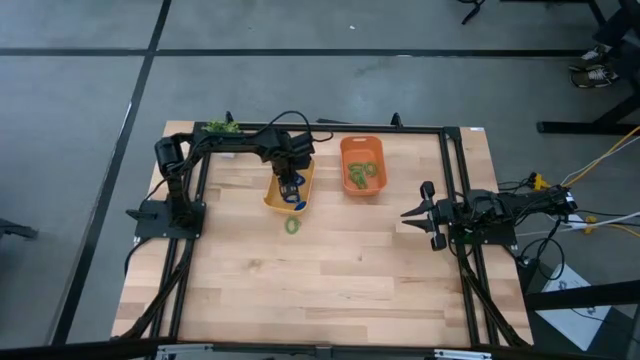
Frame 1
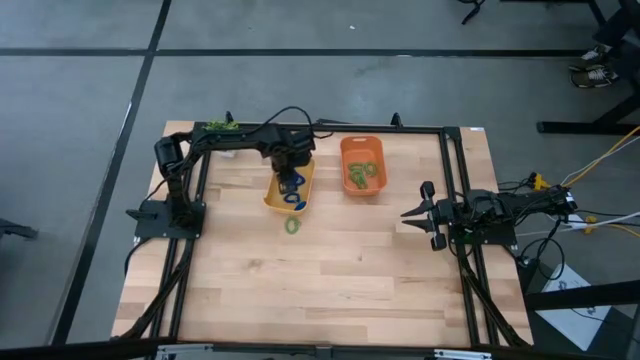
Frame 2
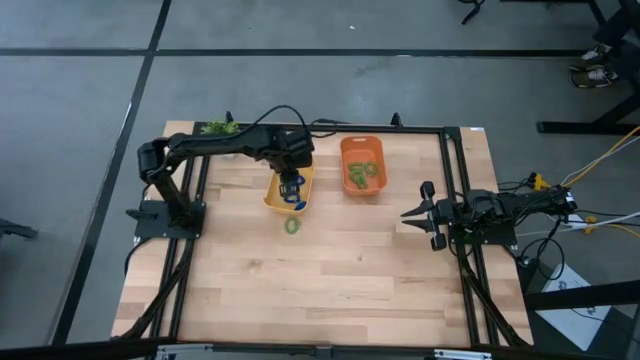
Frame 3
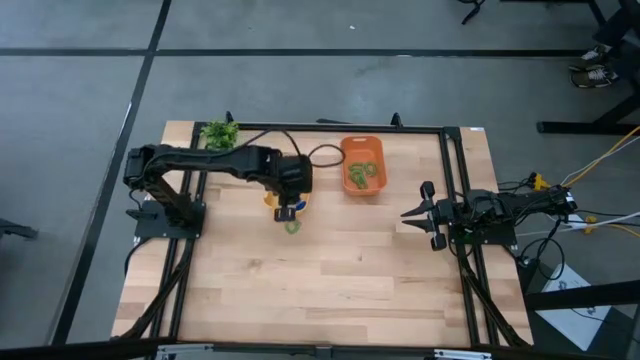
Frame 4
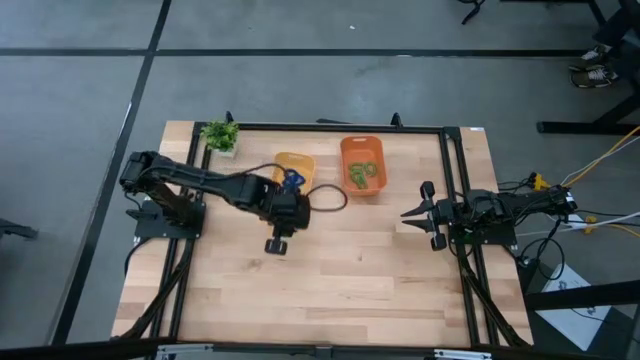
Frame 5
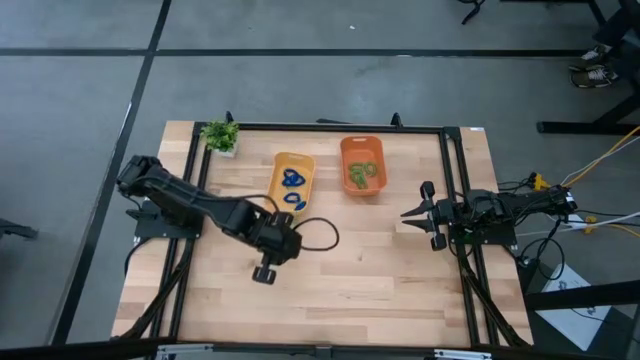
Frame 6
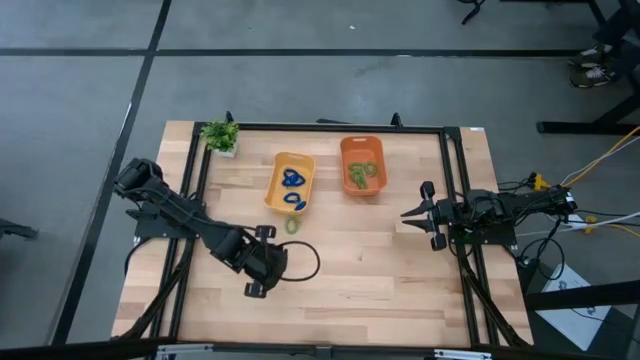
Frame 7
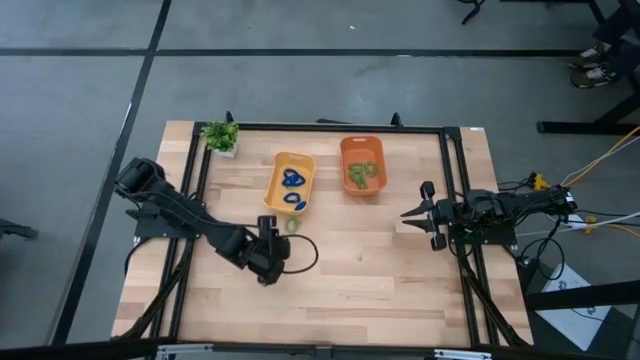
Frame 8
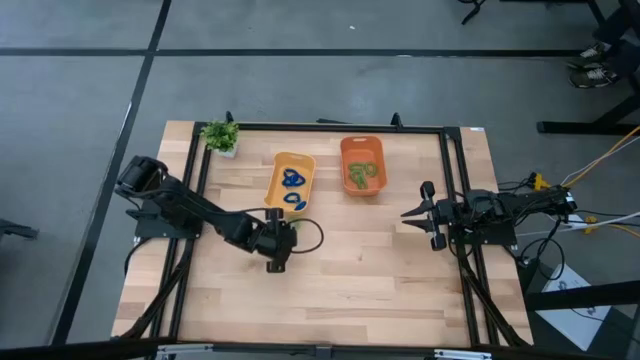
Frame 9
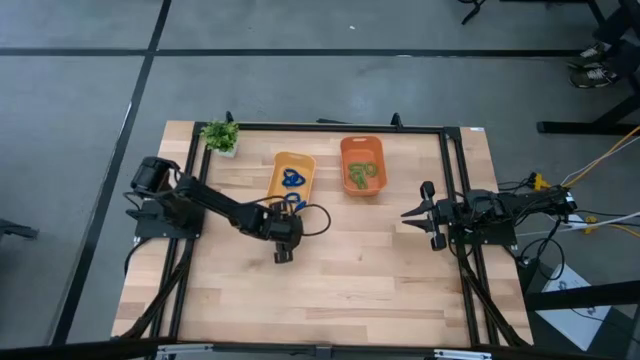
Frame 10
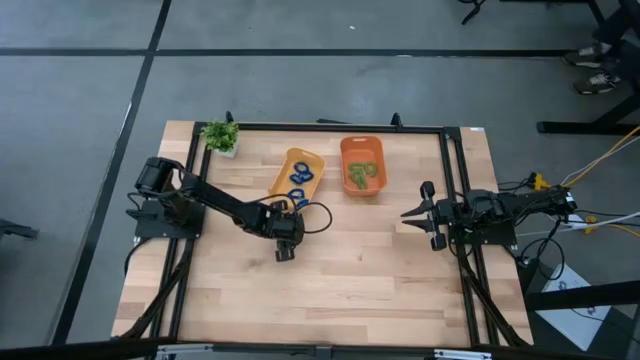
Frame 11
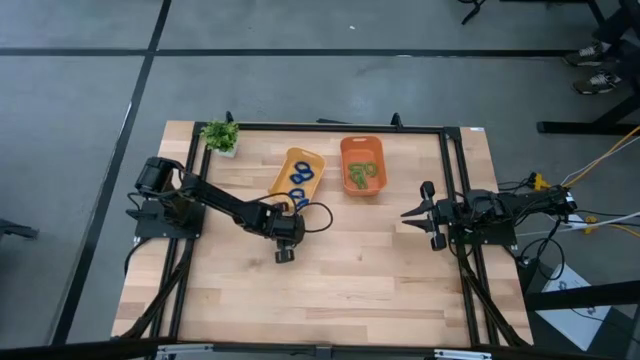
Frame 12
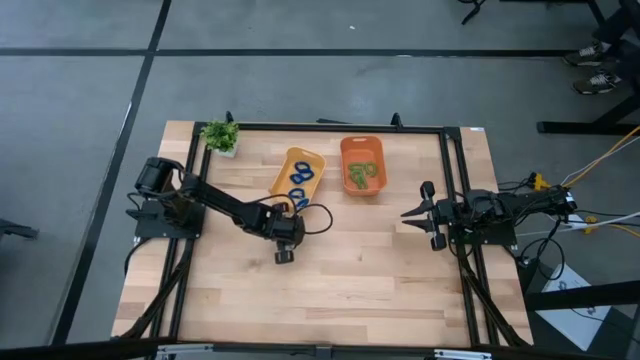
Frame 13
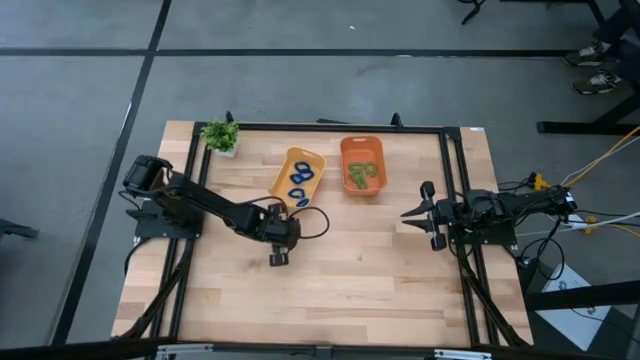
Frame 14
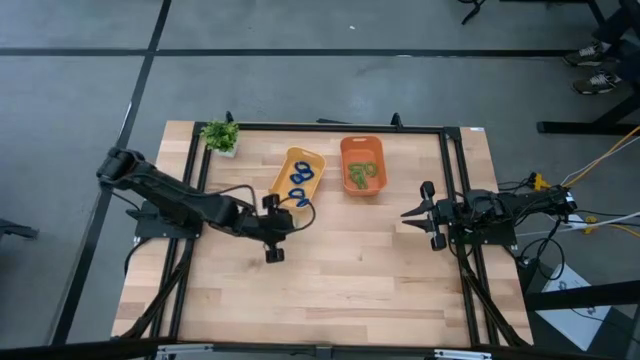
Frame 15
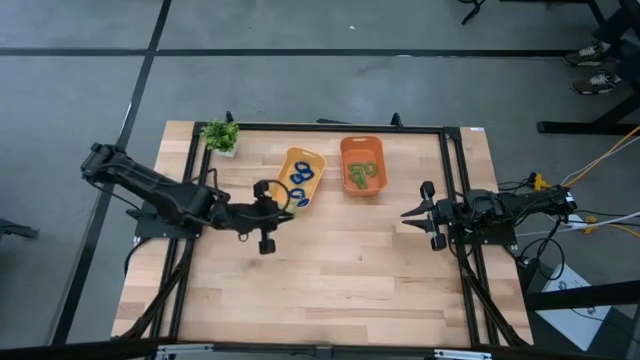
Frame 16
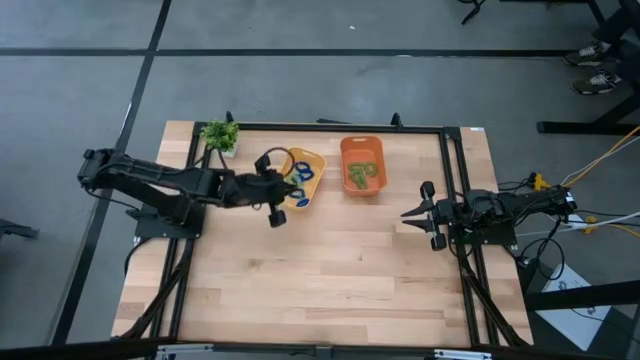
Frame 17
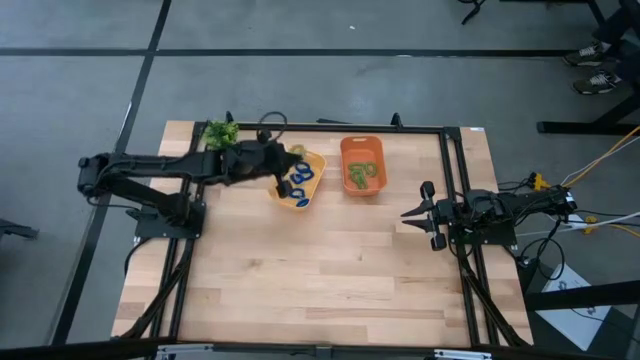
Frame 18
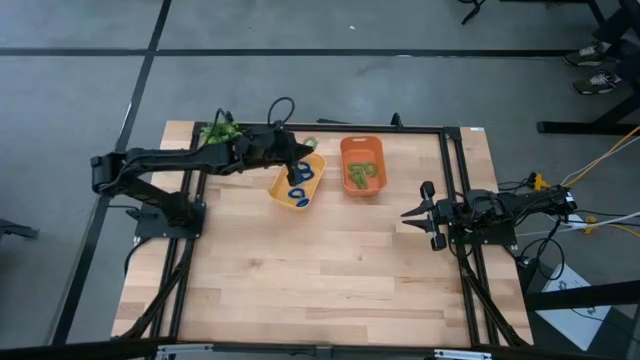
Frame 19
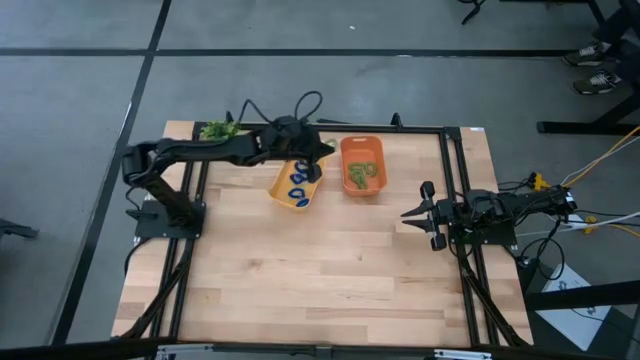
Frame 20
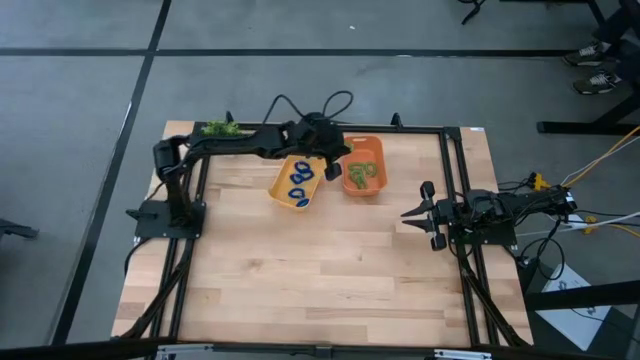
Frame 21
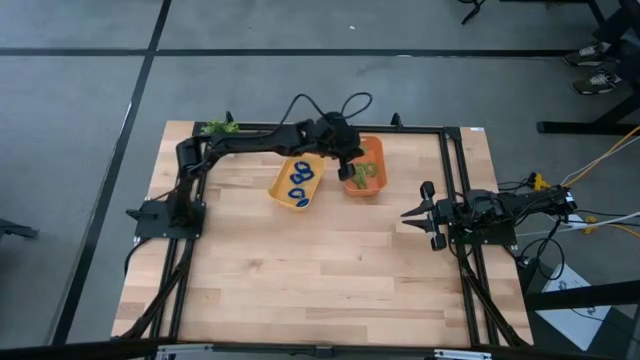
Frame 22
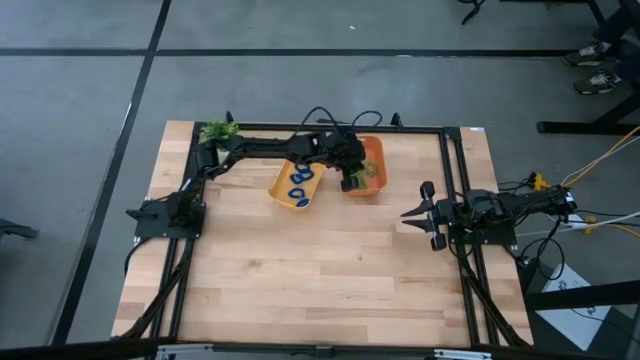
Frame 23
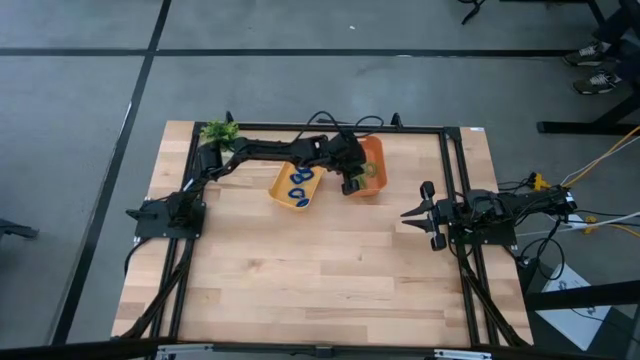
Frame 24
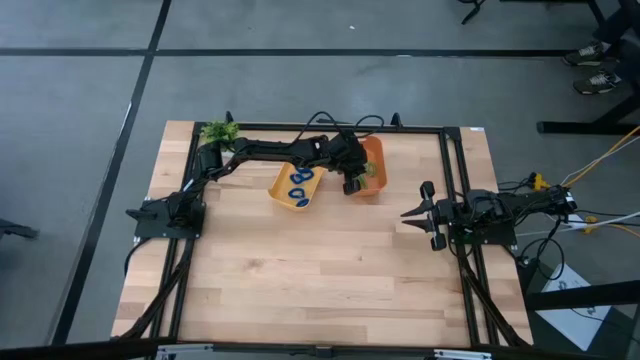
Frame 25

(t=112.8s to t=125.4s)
Task: Sort items
Put the green keychain into the orange bin

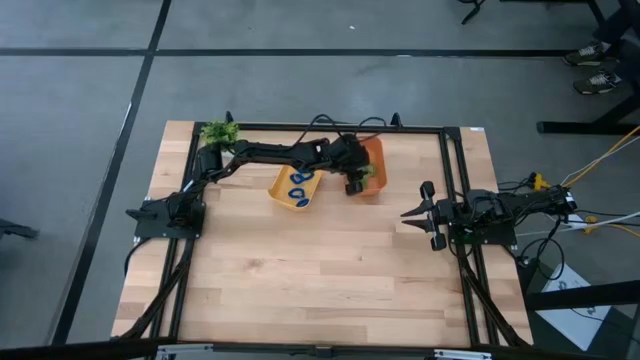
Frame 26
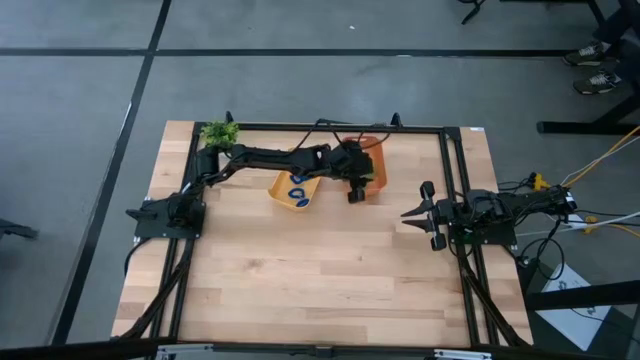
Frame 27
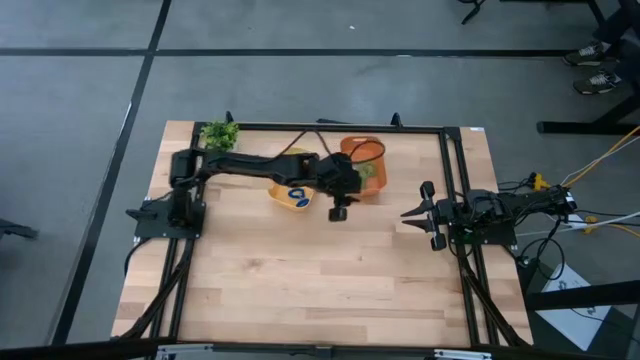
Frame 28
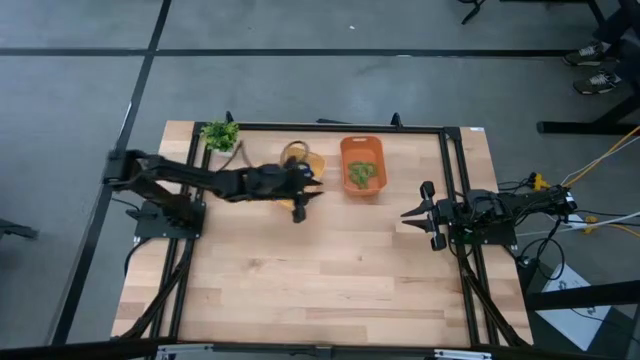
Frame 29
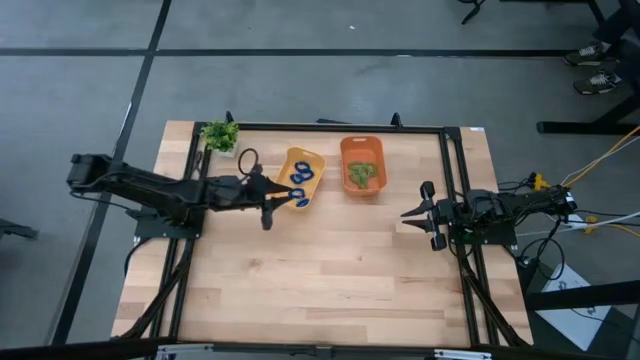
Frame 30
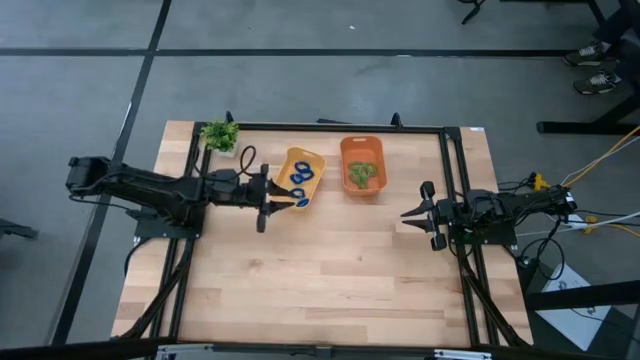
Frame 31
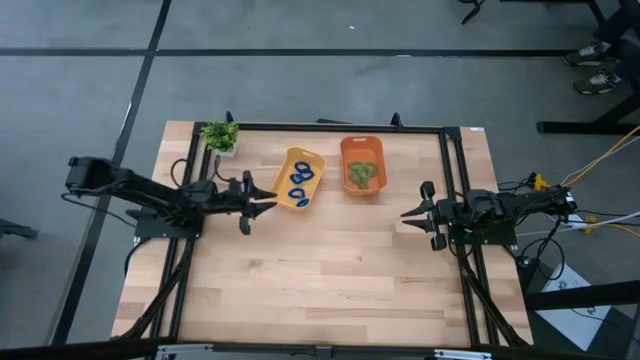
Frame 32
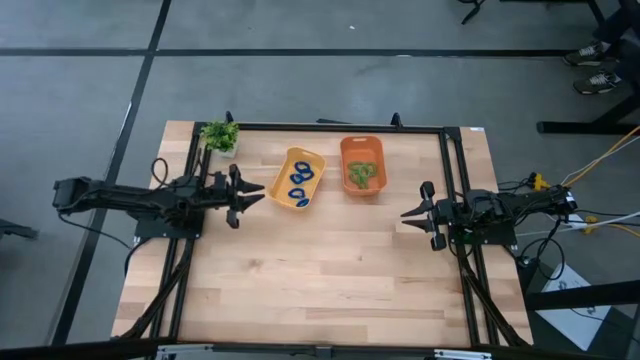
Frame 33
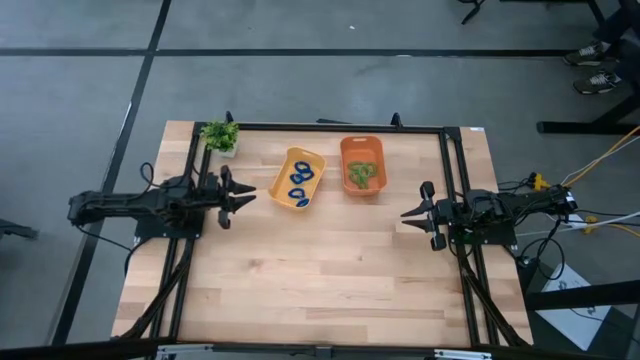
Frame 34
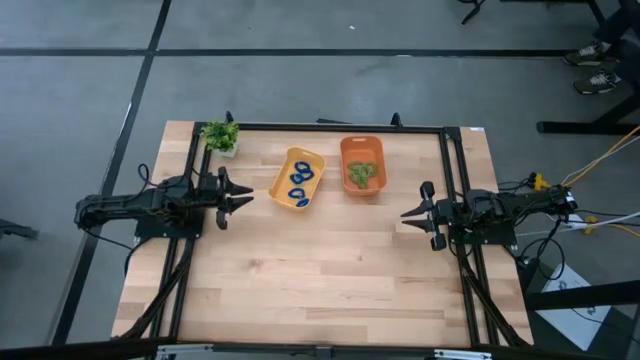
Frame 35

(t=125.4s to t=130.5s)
Return to Home Position

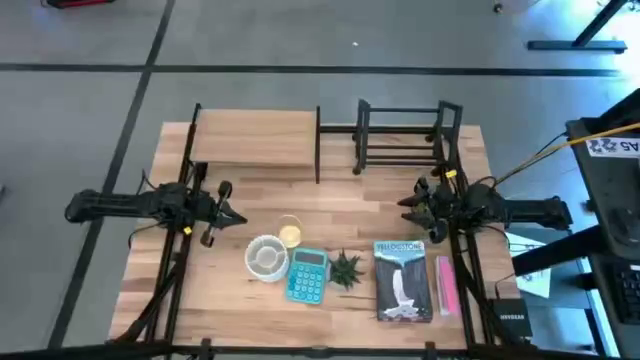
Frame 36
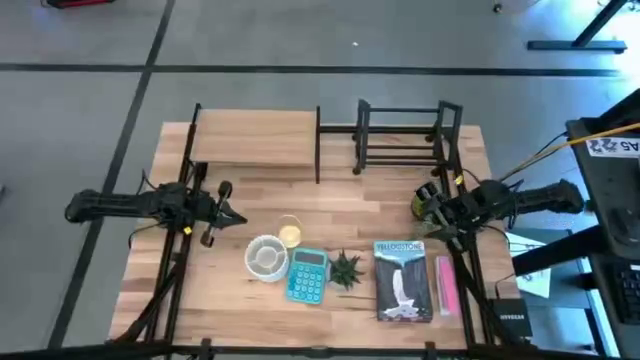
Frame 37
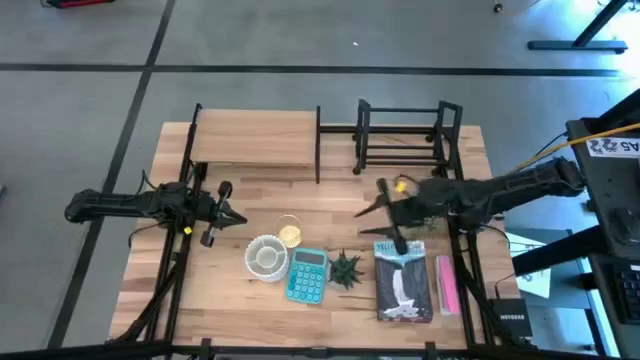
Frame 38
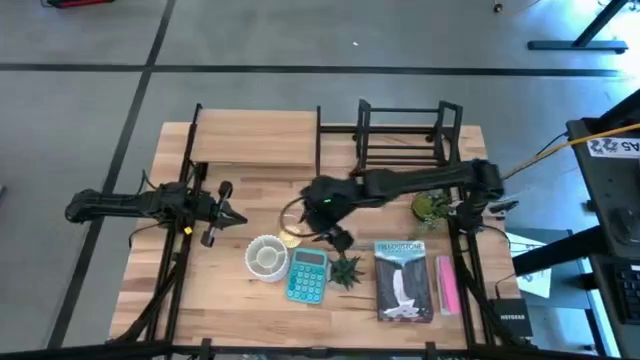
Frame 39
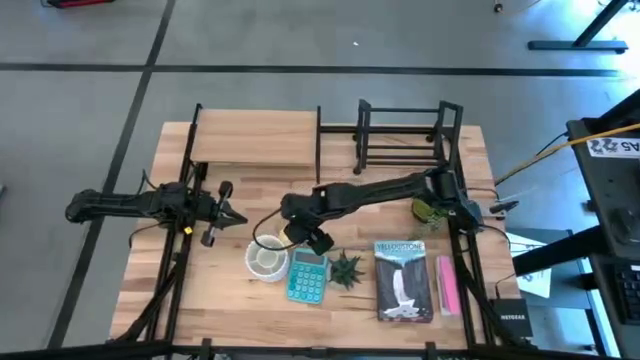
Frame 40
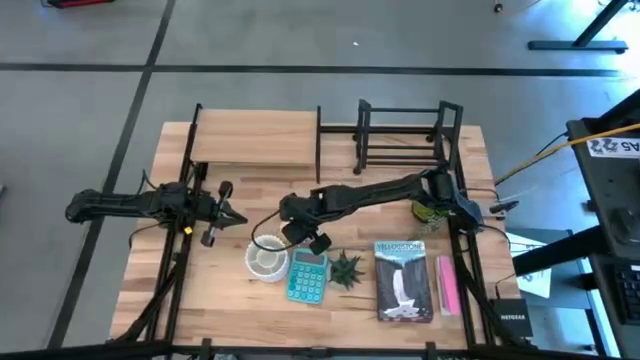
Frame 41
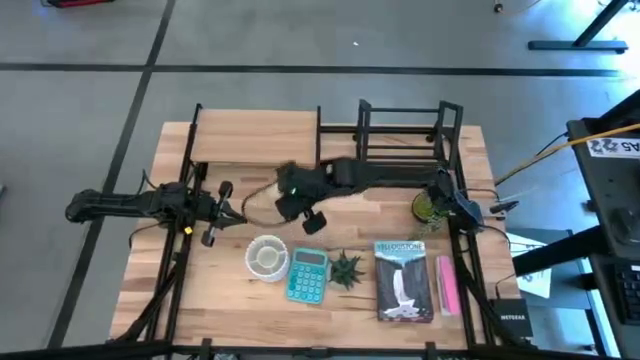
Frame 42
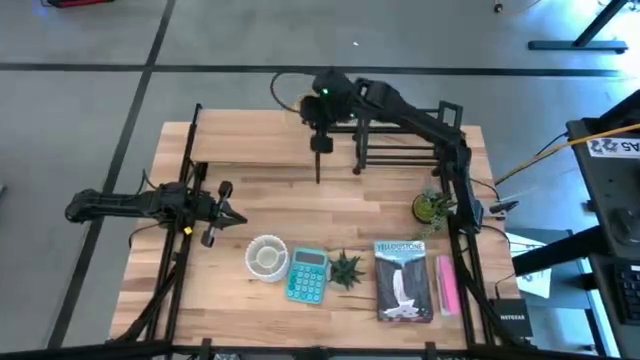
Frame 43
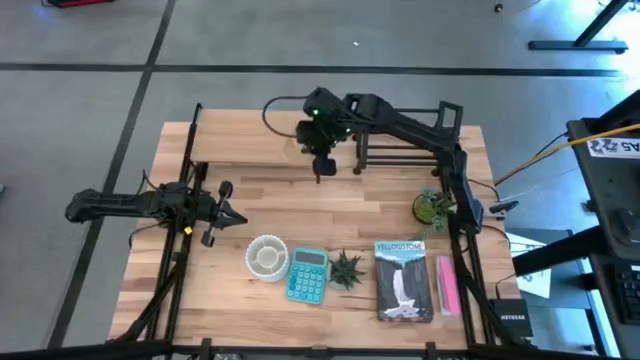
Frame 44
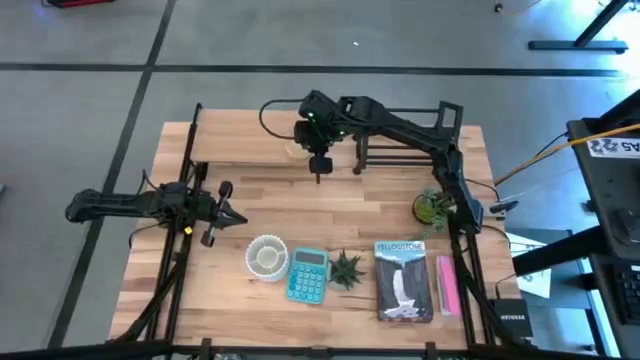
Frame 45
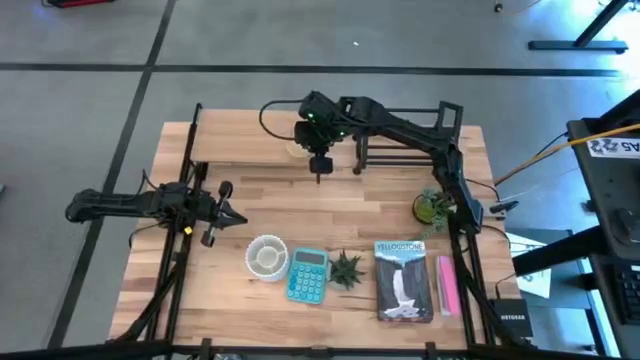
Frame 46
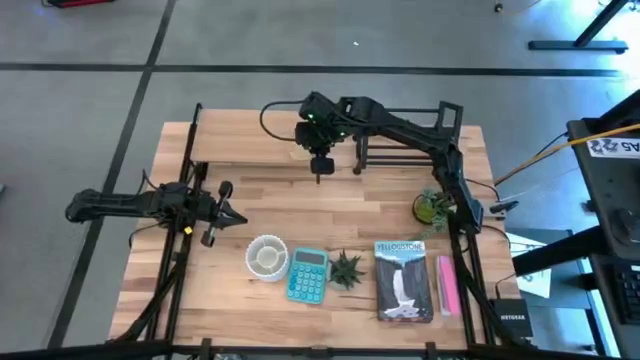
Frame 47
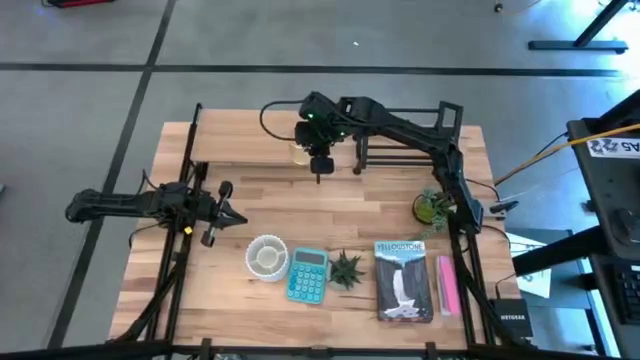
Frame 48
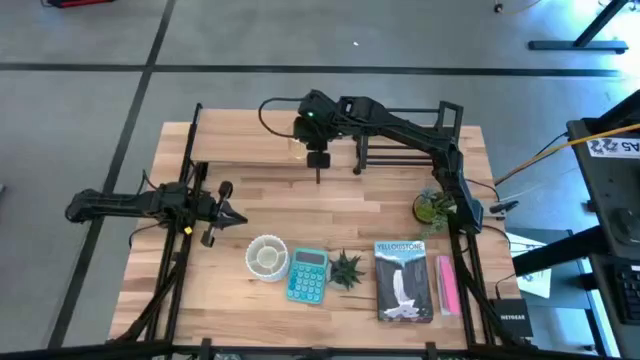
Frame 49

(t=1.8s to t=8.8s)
Task: Stock shelves
Put the gold pen holder on the shelf
